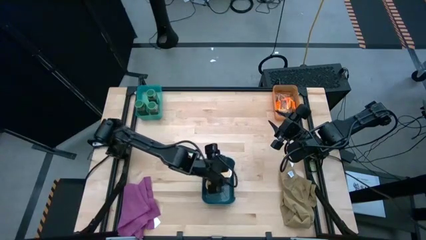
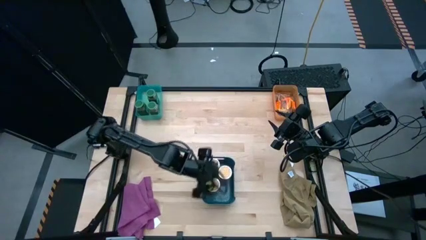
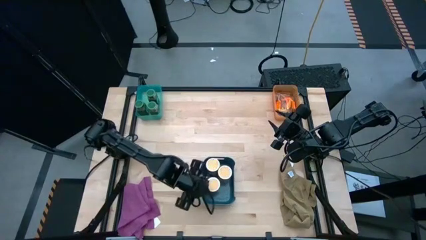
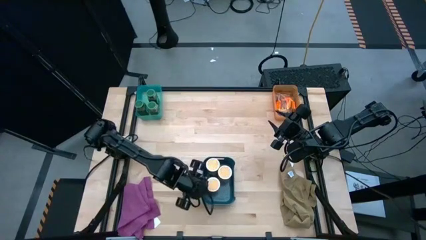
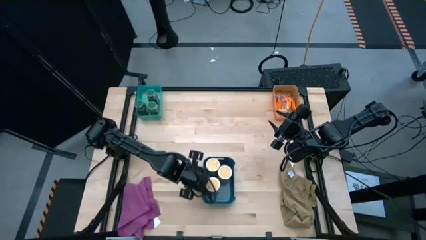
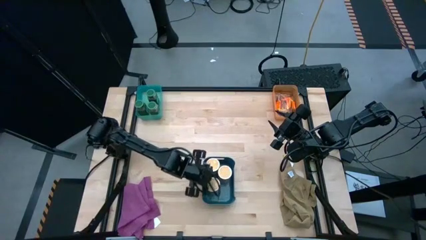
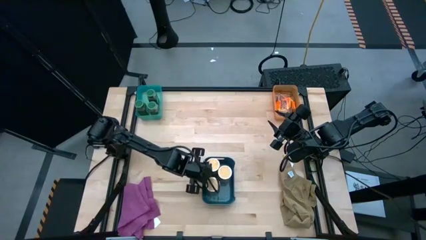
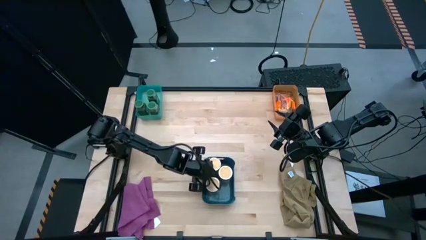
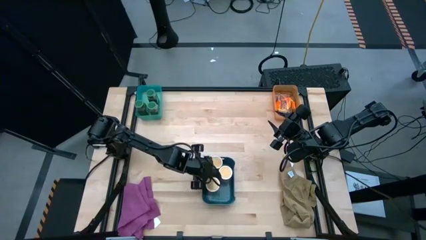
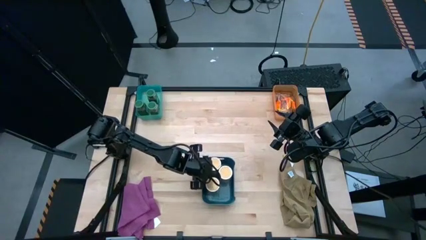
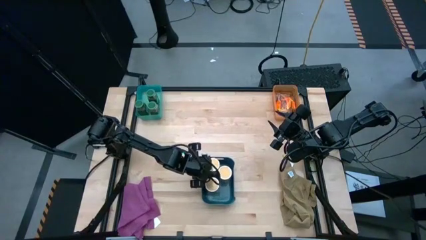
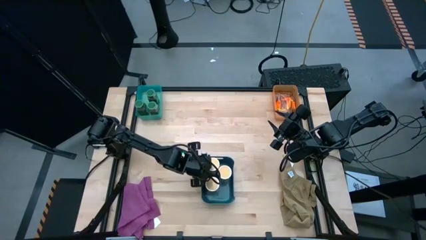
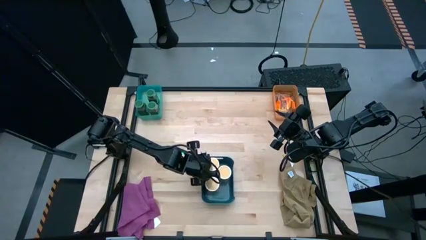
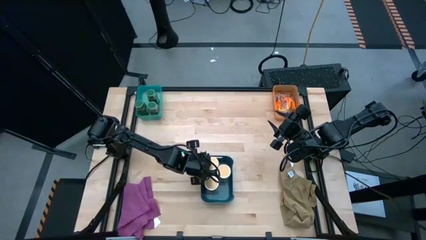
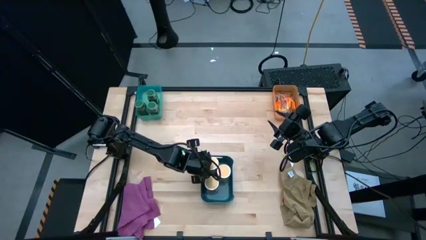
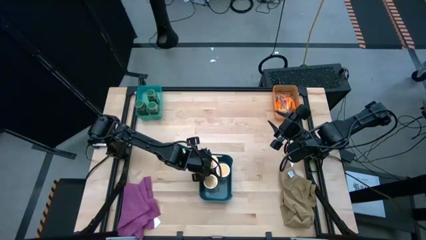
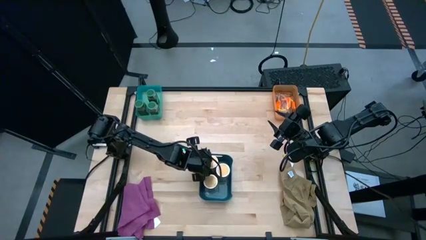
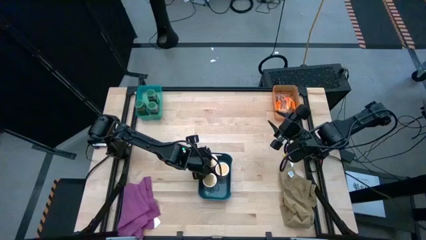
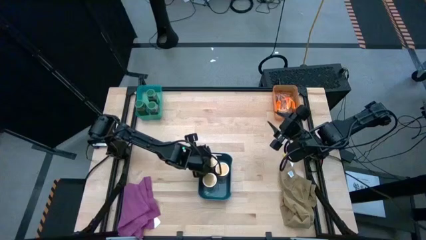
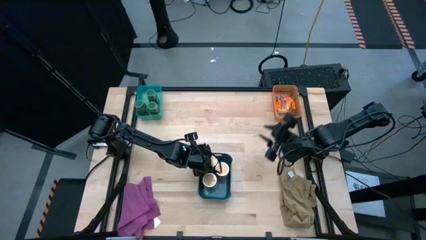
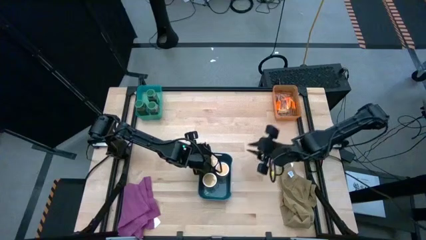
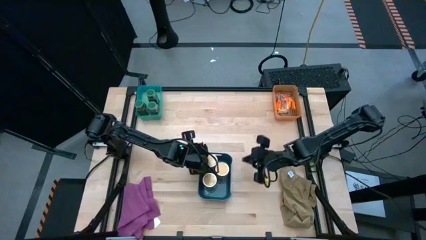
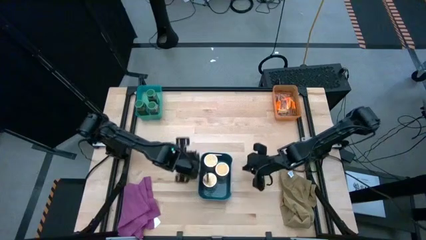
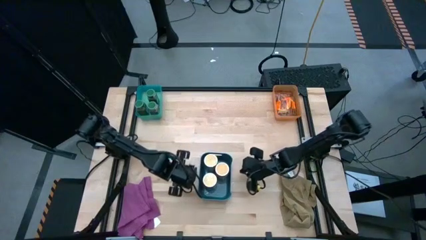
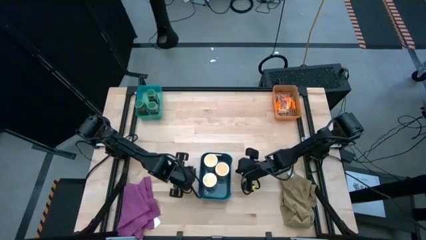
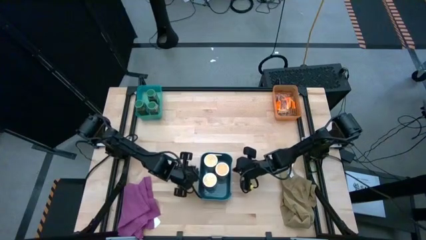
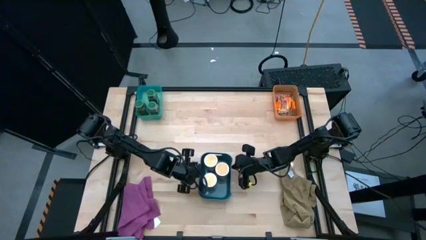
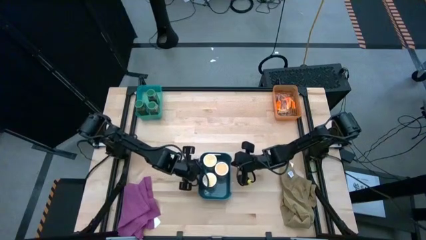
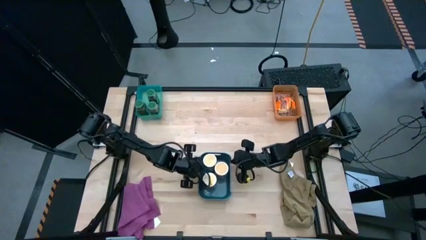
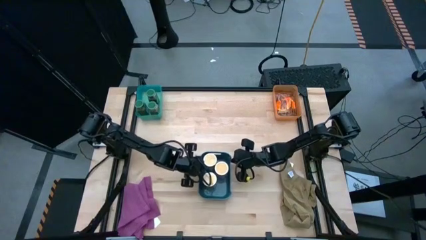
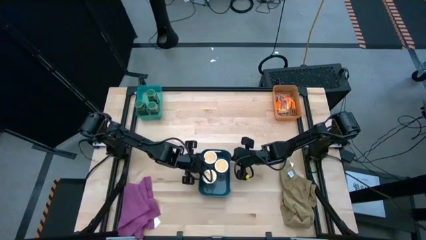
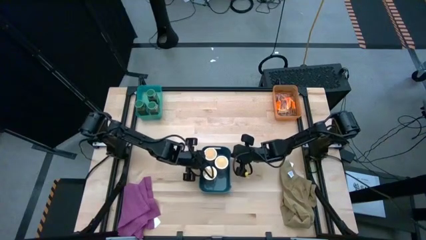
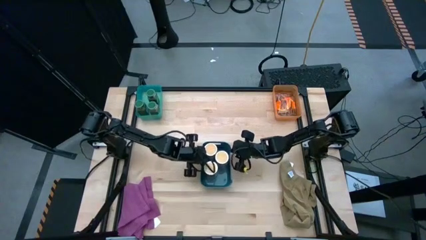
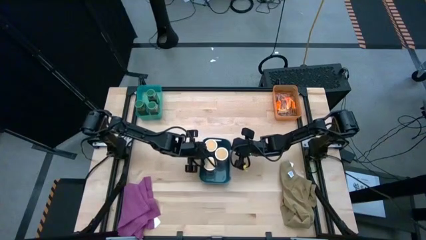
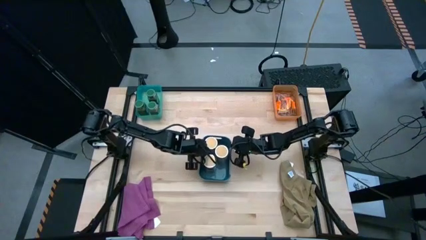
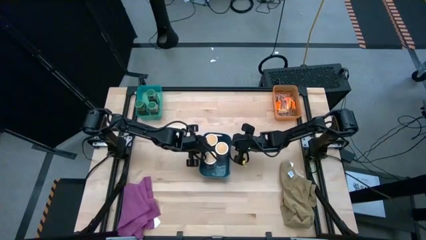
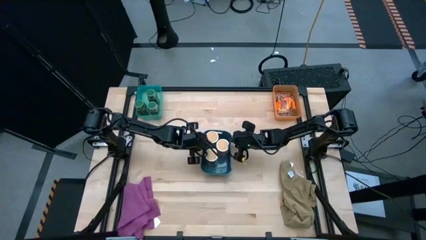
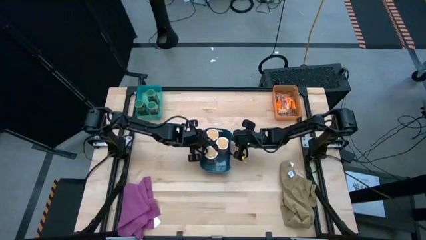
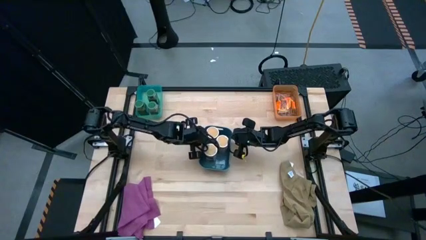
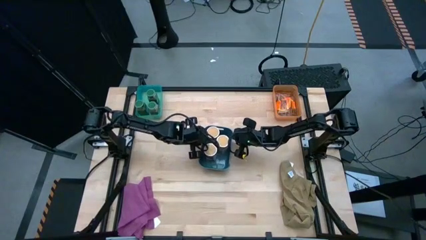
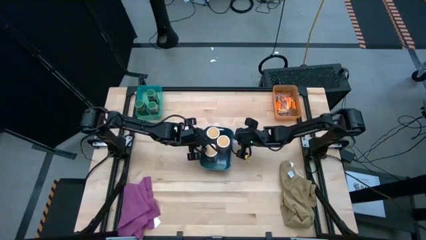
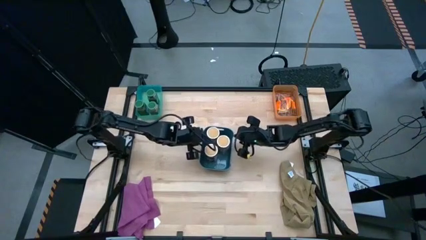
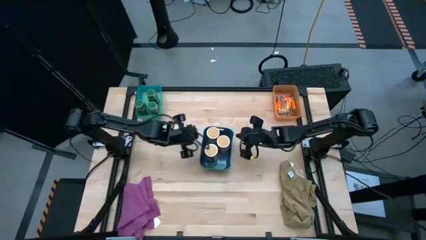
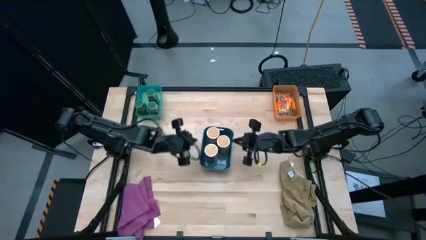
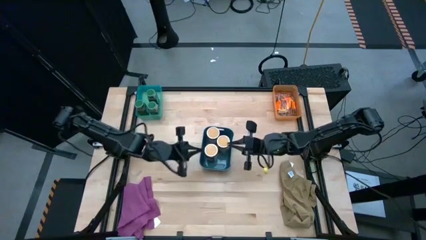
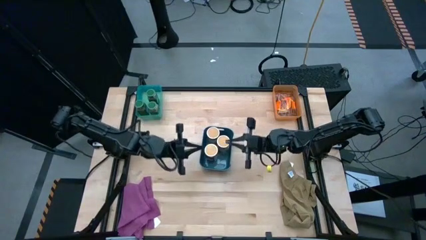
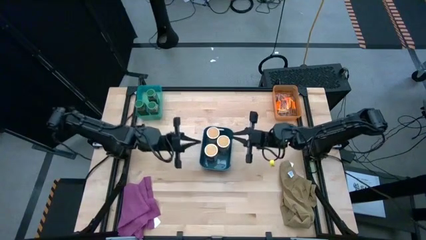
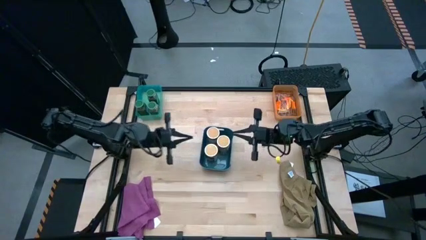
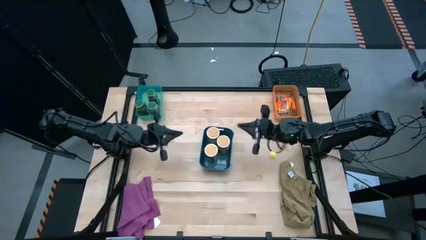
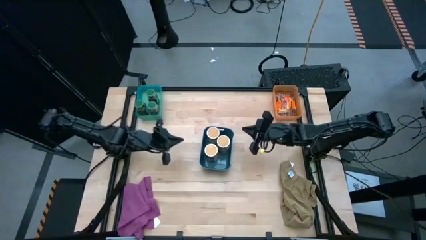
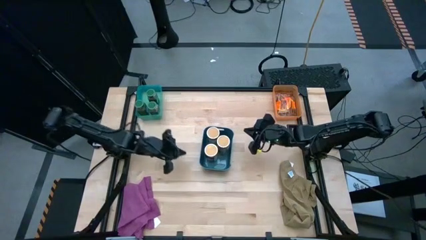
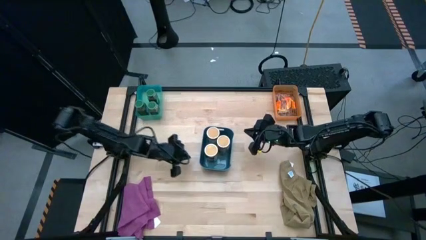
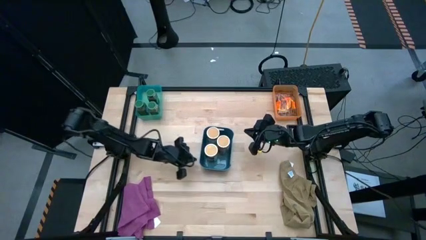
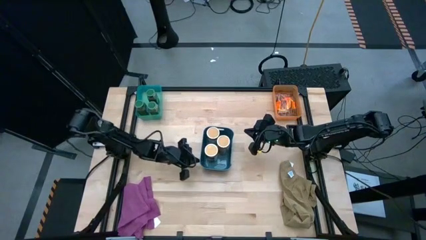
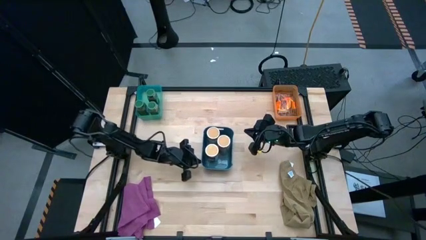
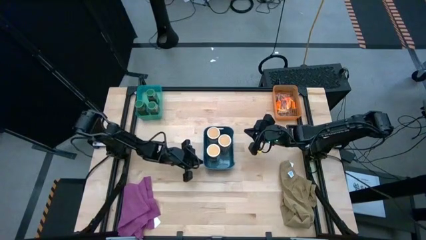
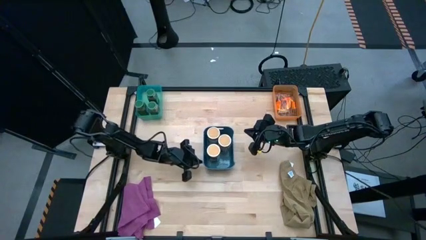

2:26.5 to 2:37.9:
Task: Sort spices by type
Move the blue bin to the center of the table

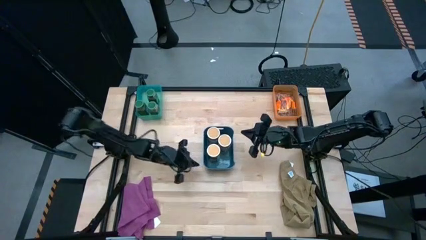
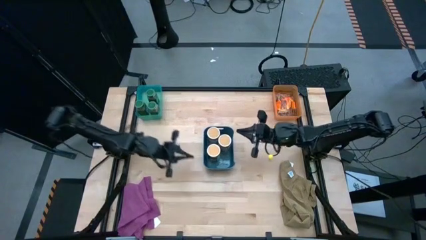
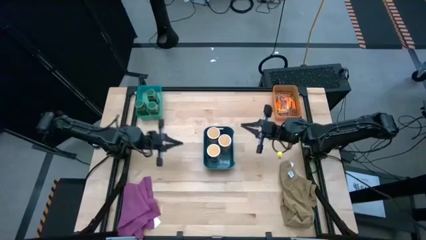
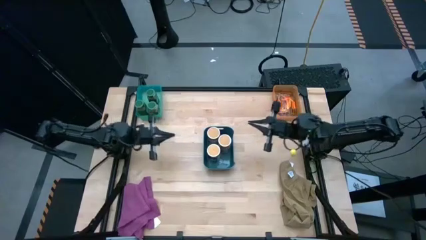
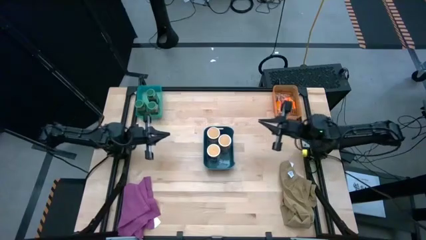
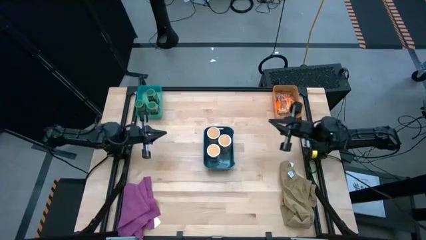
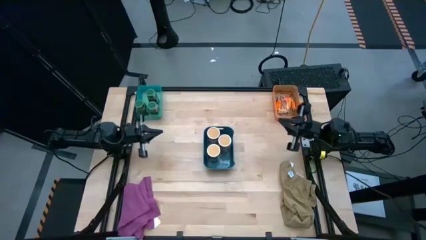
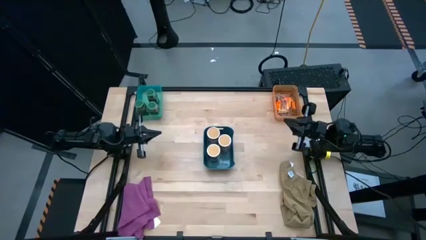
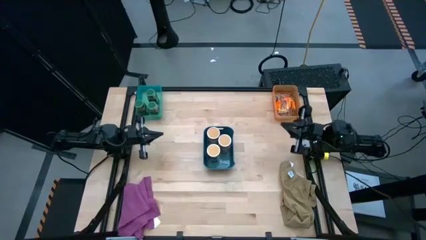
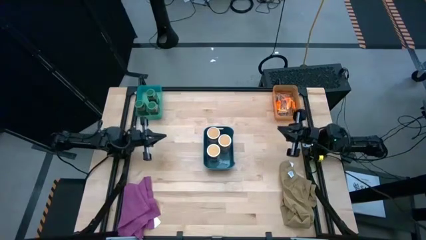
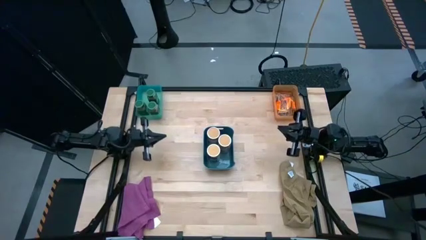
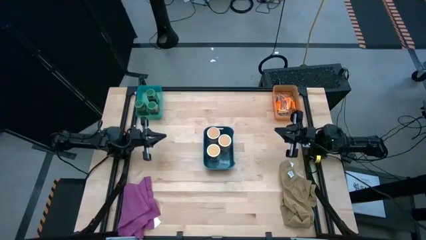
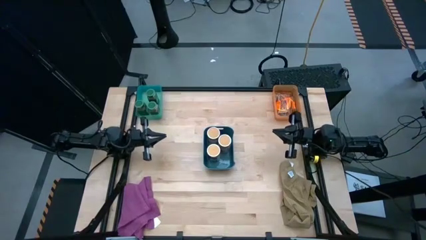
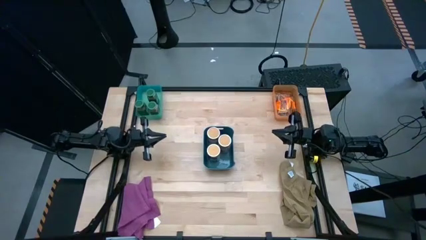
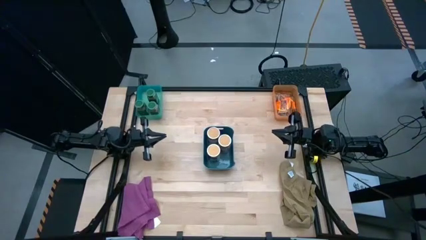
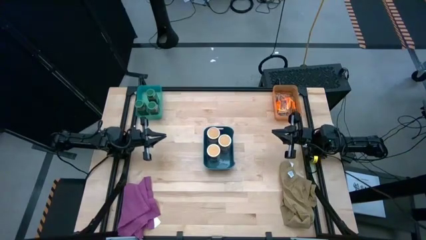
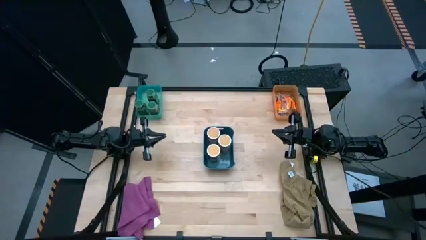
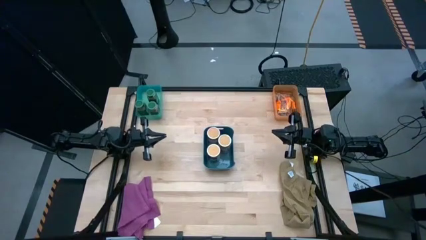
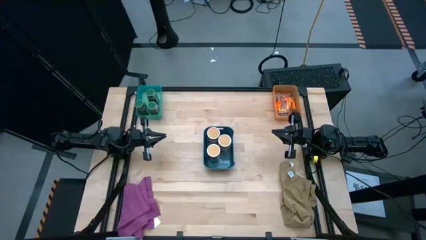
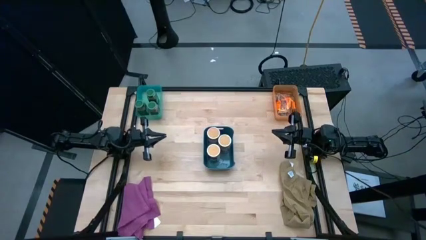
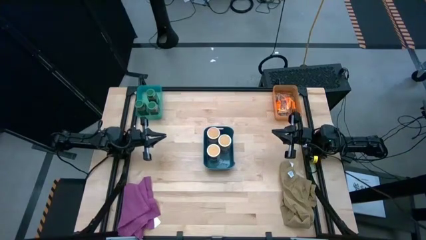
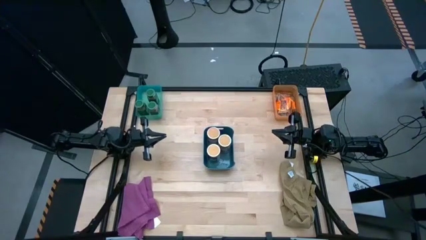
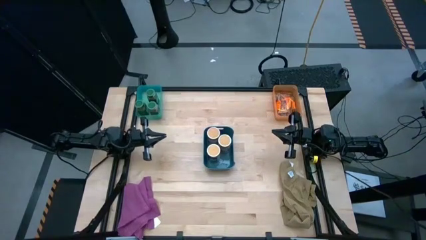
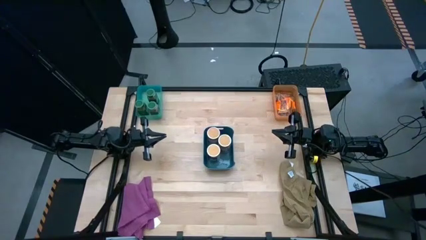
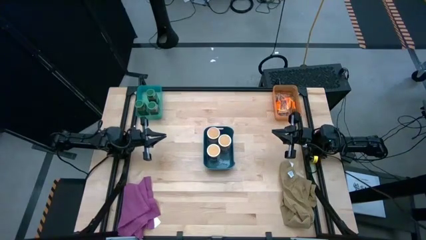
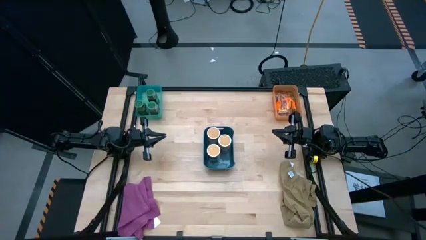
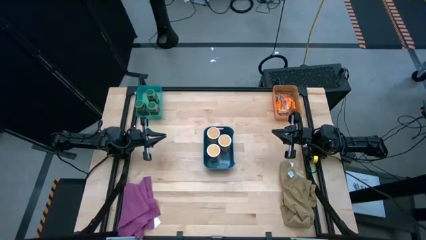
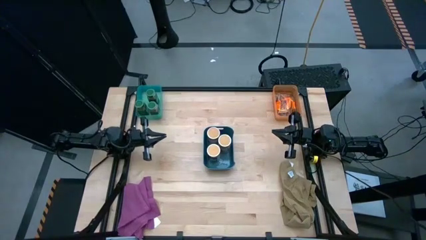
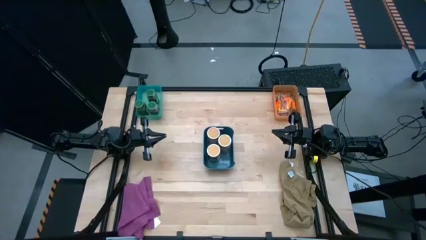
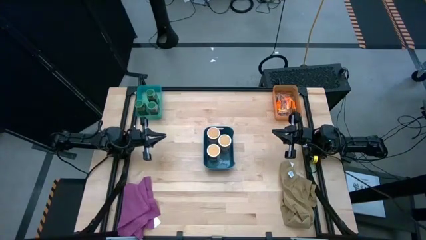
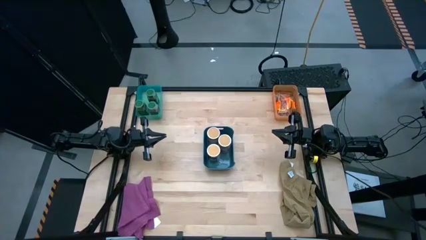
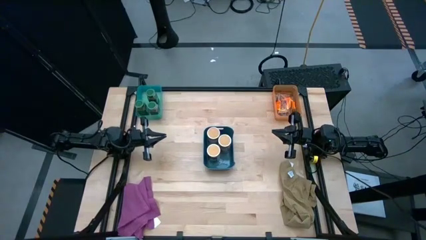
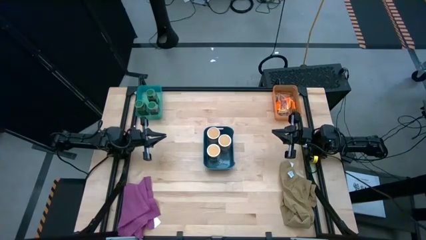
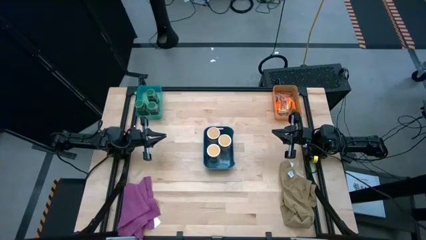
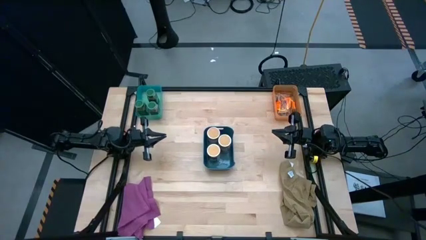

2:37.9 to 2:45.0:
Return to Home Position
